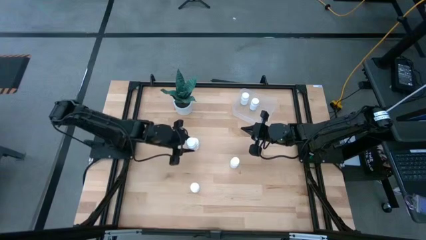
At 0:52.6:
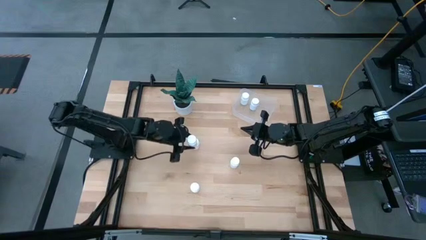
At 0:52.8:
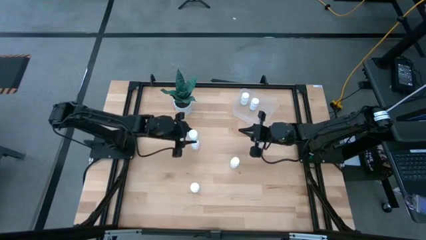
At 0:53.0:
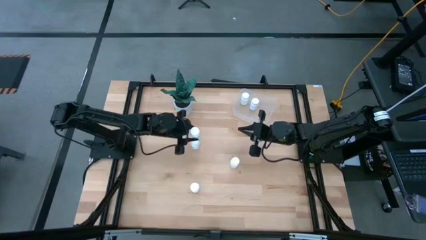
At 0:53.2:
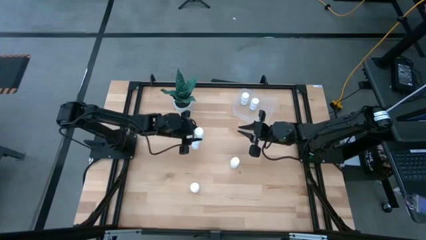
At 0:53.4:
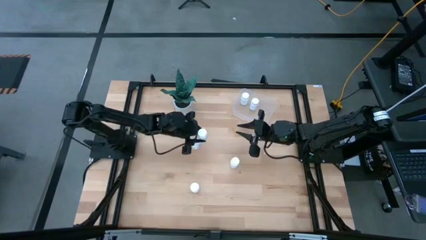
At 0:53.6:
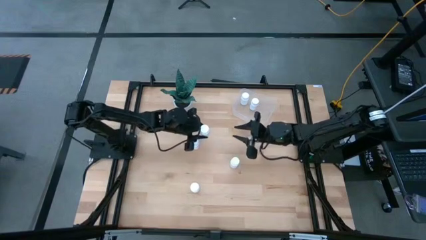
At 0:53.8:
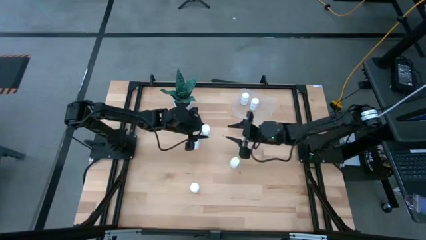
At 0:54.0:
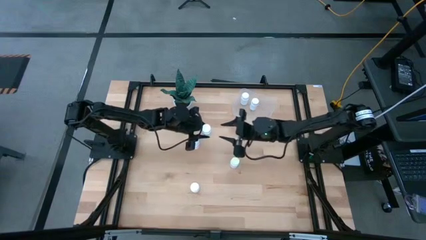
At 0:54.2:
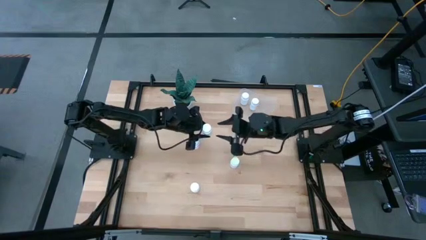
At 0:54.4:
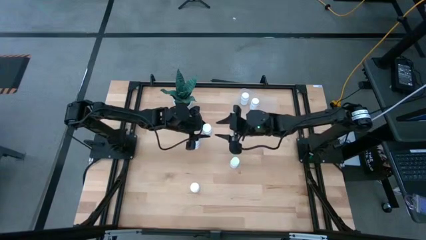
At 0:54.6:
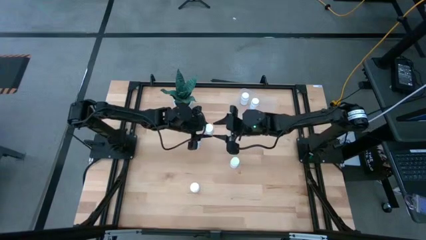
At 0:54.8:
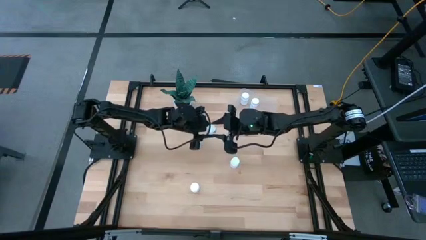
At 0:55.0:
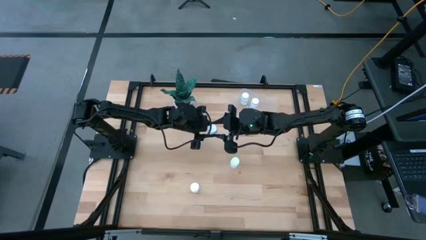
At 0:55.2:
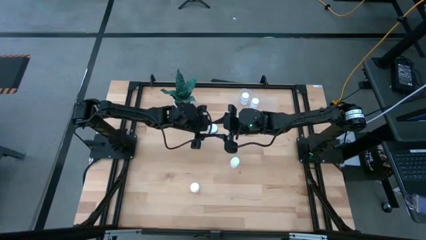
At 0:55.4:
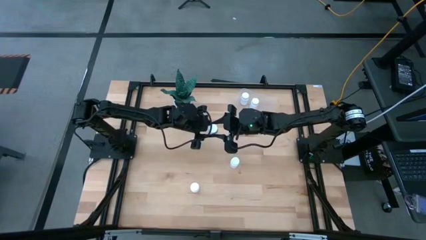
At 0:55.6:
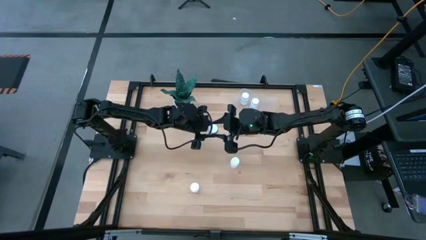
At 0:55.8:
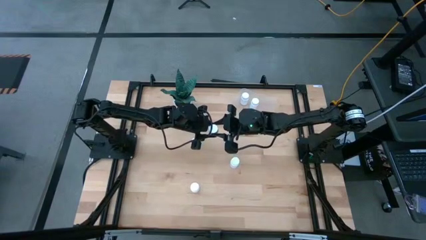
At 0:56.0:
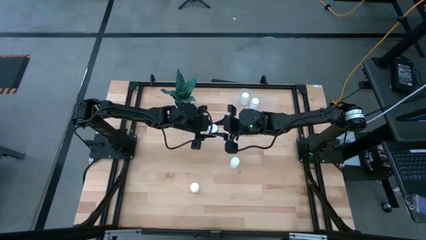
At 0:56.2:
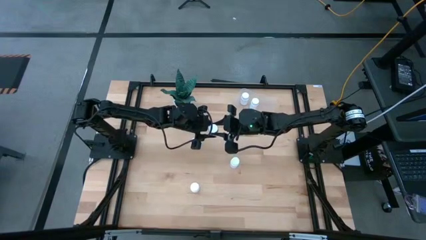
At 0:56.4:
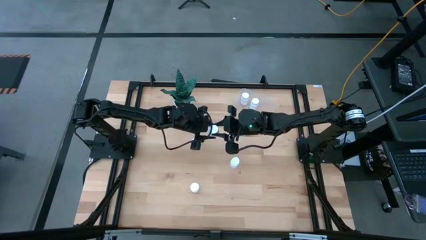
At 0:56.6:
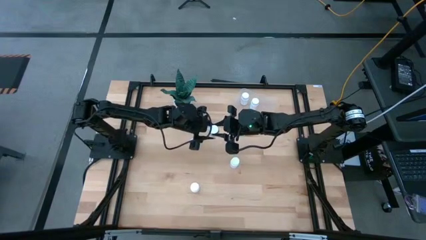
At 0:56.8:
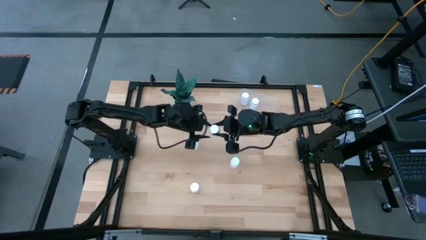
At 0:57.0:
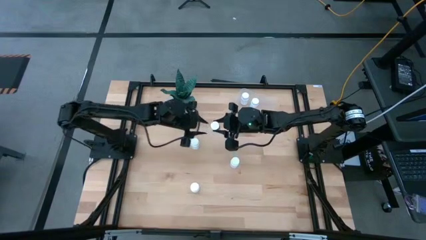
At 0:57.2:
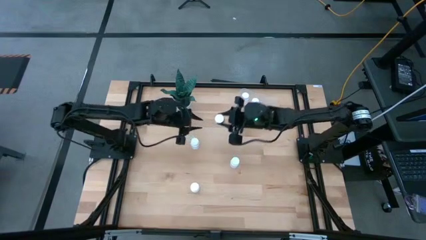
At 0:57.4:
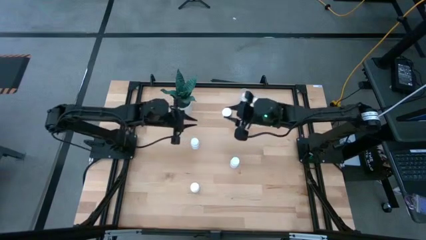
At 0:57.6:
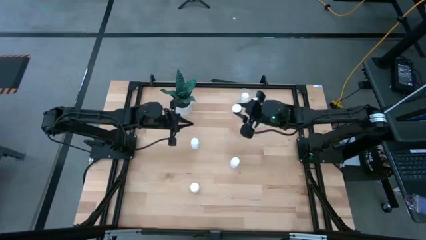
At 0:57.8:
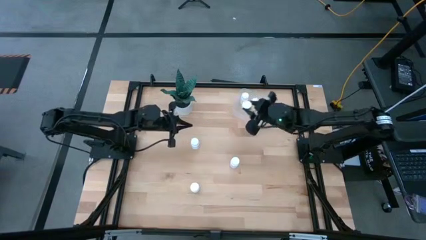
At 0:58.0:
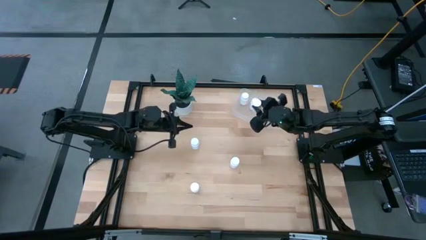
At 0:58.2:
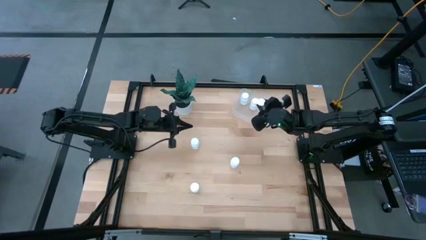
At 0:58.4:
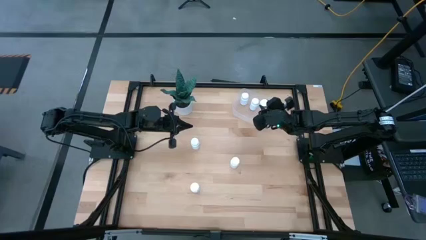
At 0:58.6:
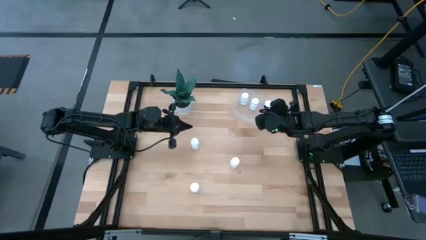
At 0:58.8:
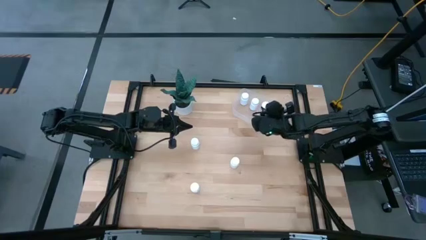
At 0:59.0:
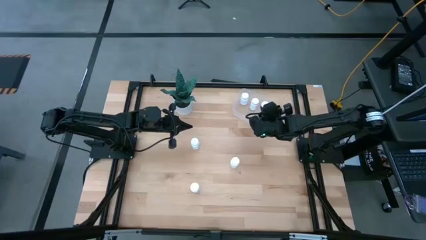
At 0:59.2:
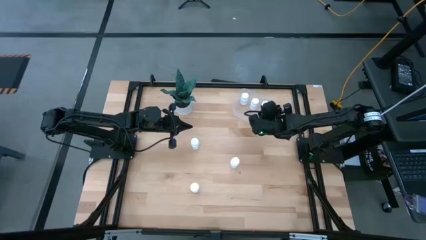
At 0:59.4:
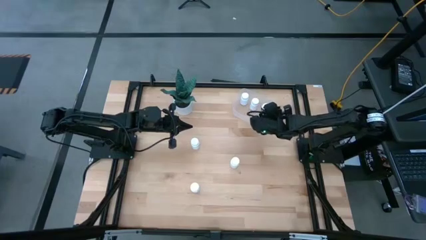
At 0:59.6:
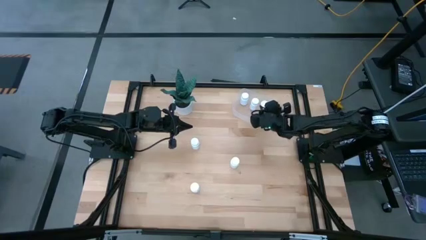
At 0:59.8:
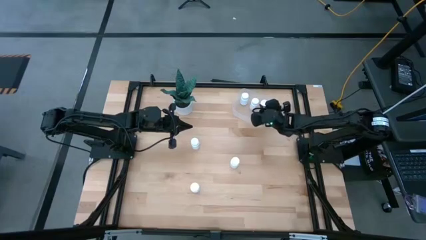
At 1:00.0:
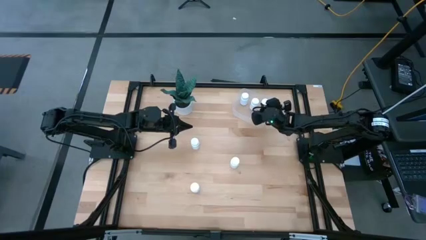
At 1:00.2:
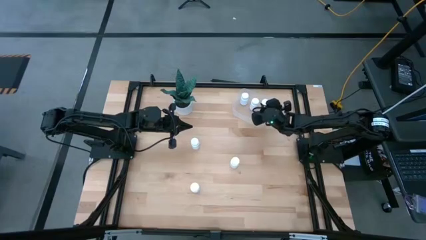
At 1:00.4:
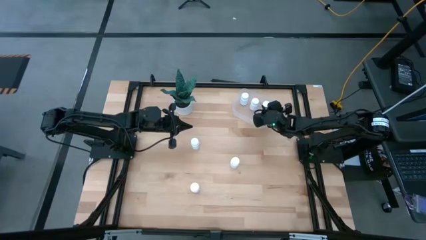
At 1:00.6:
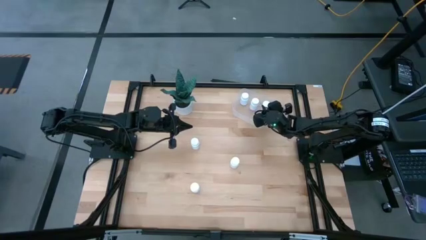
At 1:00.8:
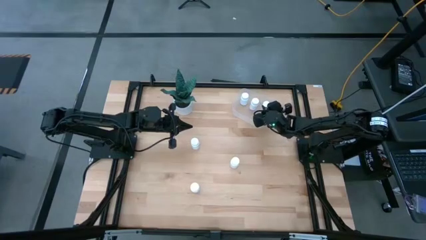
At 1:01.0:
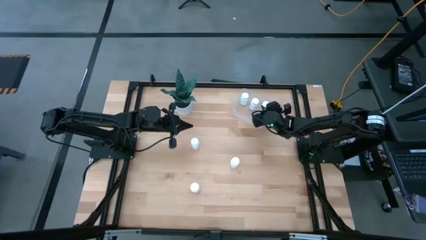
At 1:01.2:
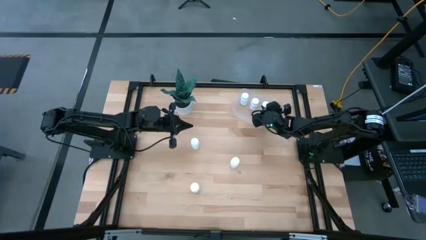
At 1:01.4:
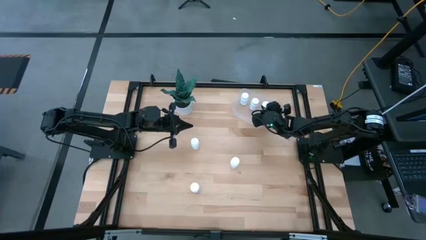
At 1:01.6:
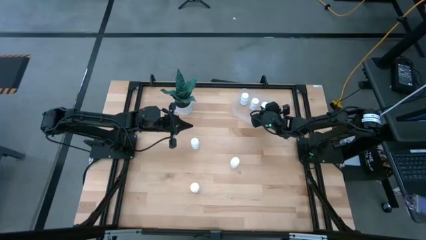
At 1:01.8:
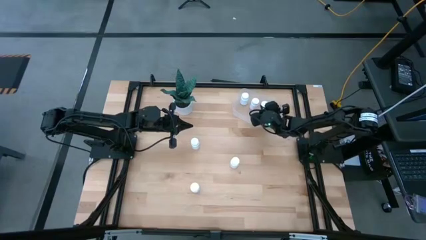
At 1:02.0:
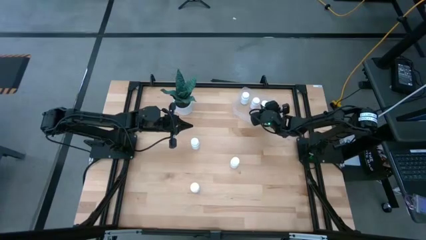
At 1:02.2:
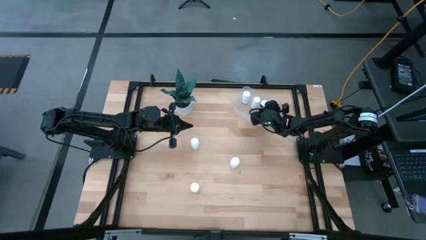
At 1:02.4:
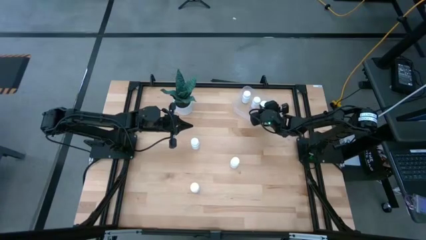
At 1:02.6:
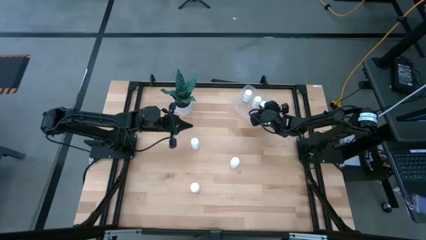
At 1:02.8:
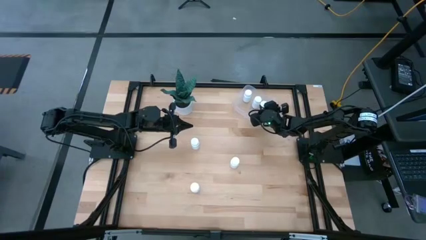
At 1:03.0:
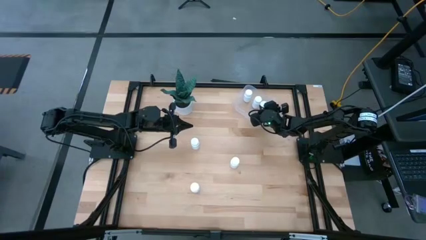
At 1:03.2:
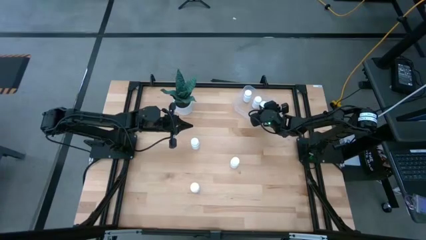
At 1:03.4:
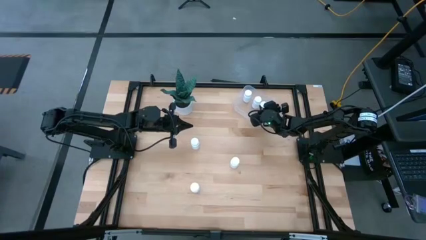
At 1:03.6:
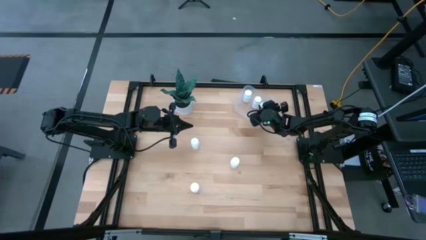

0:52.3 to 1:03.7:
Task: Pick and place pill bottles into a basket
Put the white pill bottle into the transparent bin
